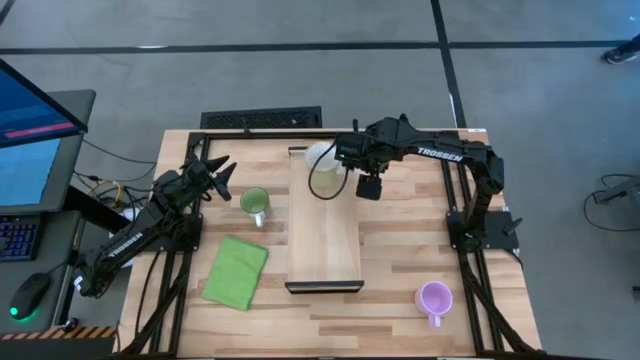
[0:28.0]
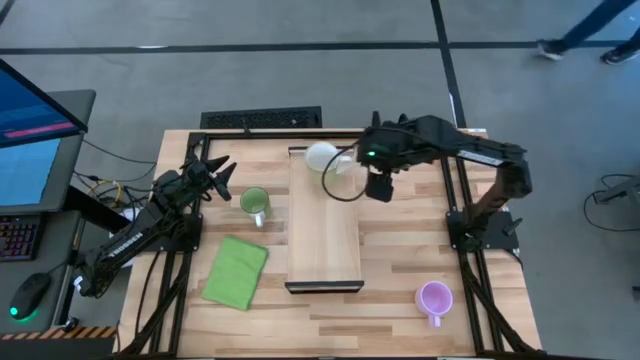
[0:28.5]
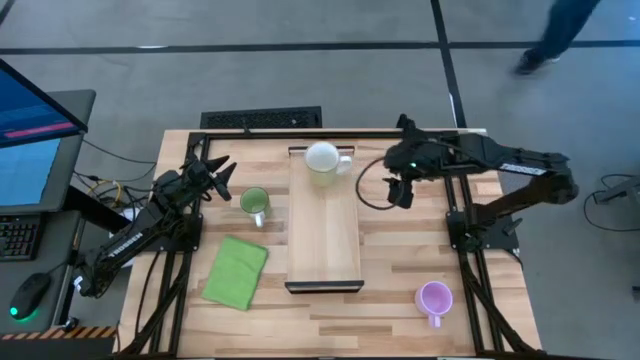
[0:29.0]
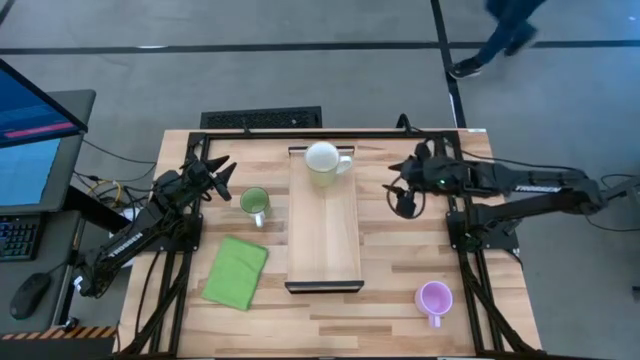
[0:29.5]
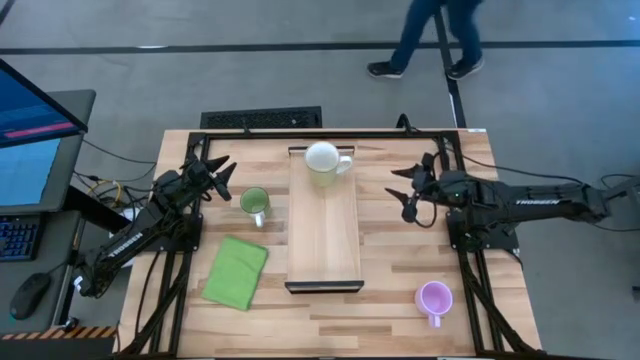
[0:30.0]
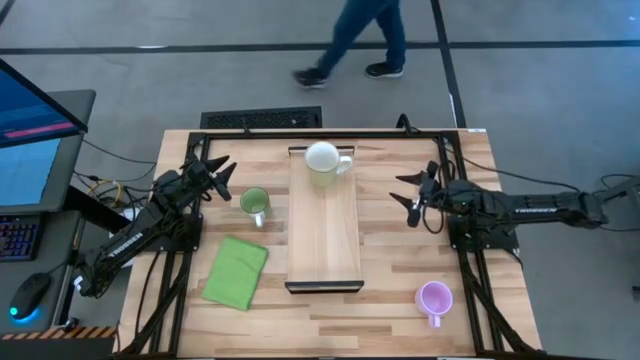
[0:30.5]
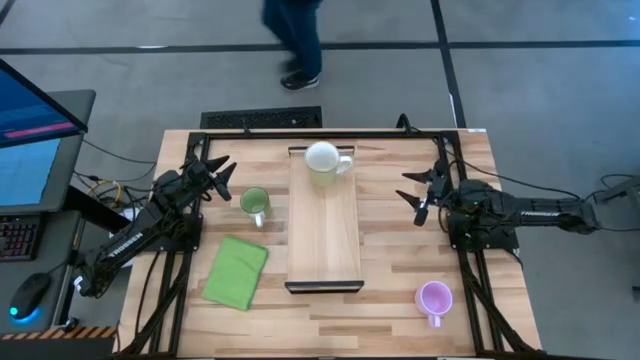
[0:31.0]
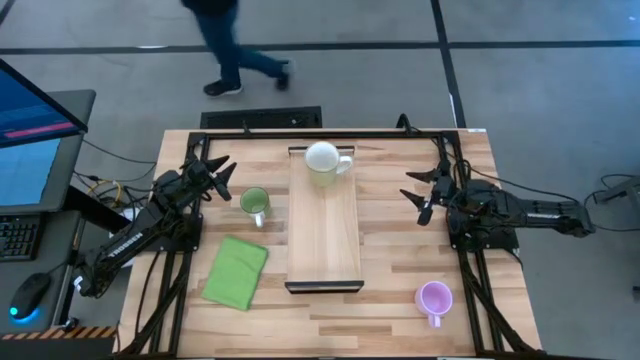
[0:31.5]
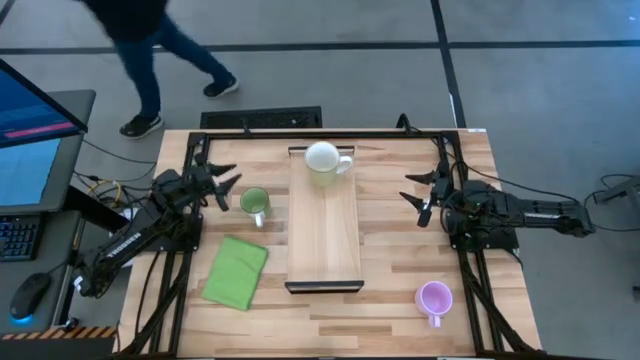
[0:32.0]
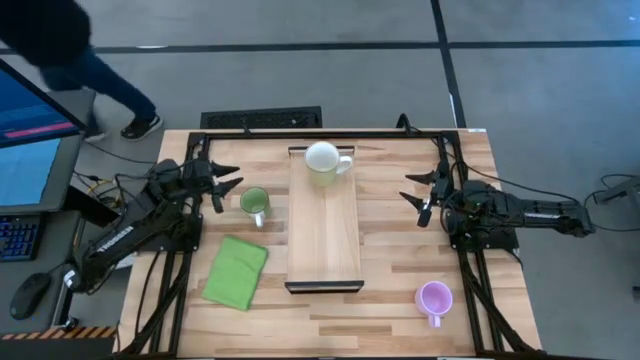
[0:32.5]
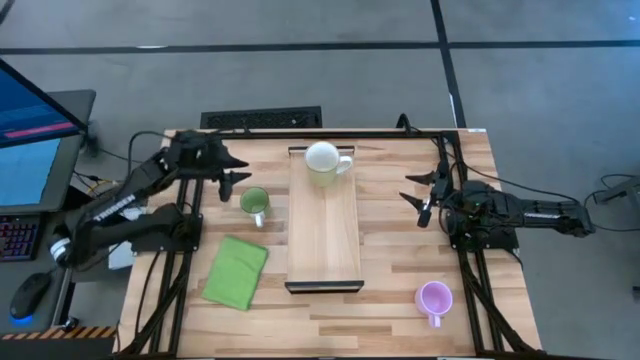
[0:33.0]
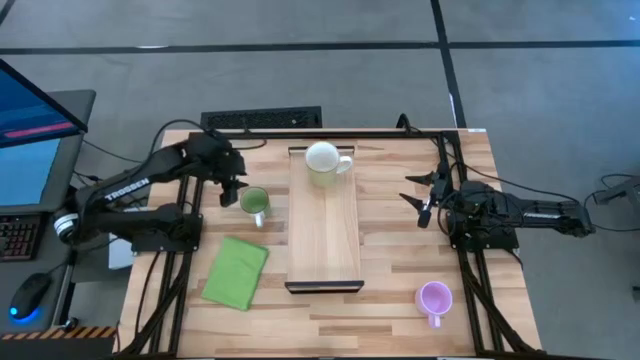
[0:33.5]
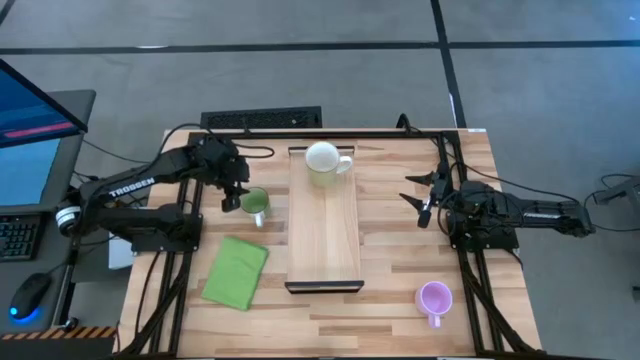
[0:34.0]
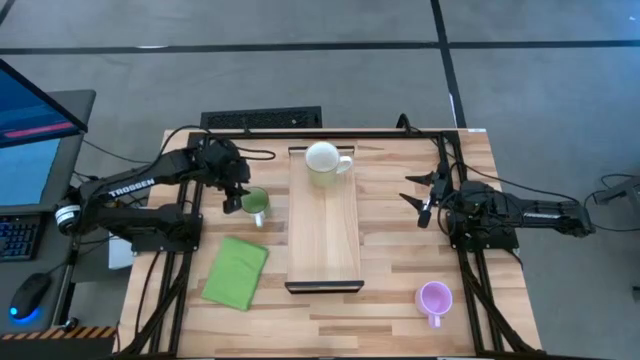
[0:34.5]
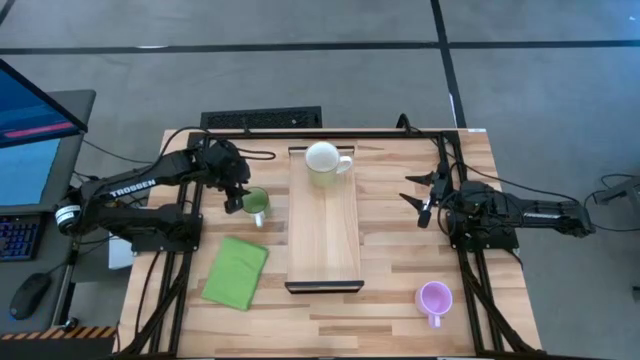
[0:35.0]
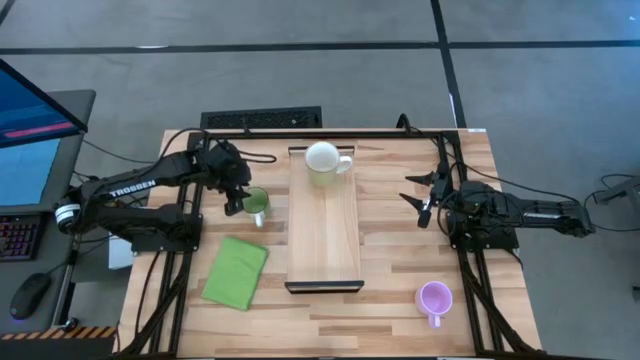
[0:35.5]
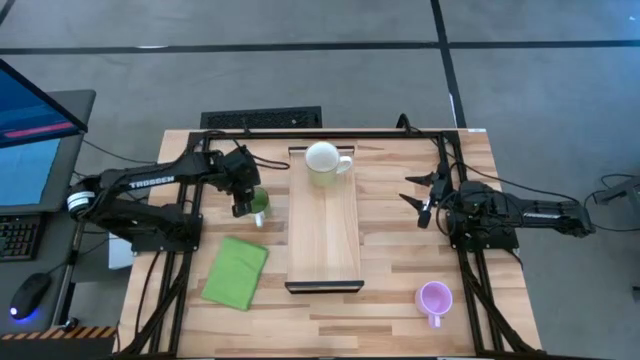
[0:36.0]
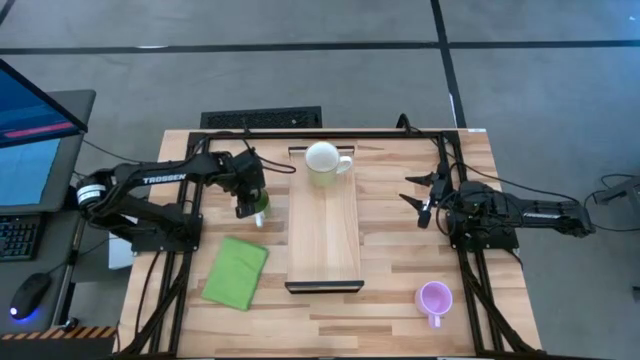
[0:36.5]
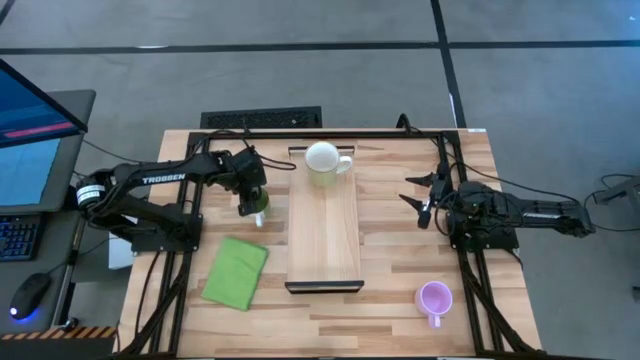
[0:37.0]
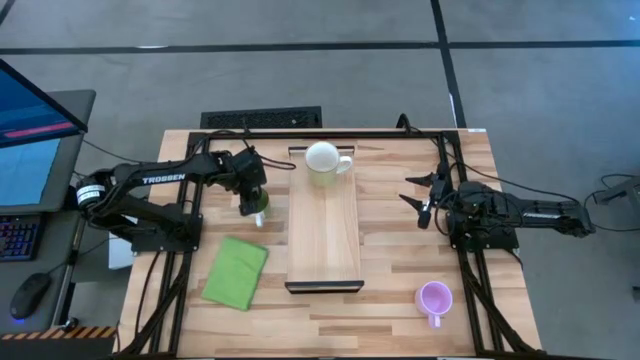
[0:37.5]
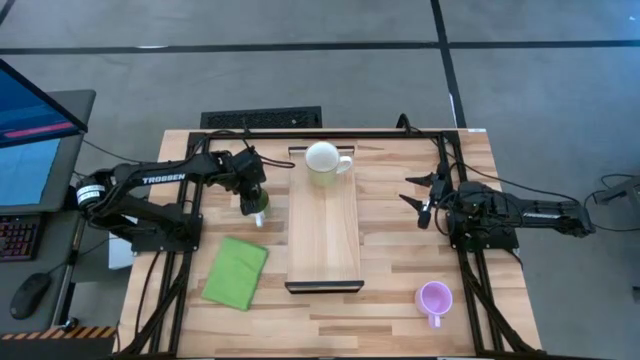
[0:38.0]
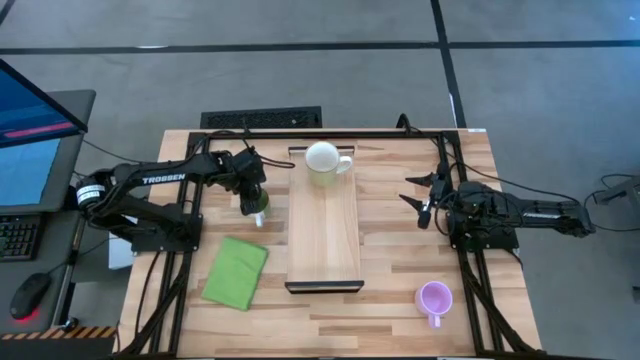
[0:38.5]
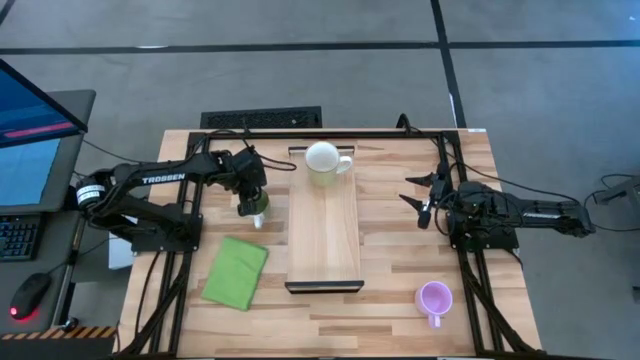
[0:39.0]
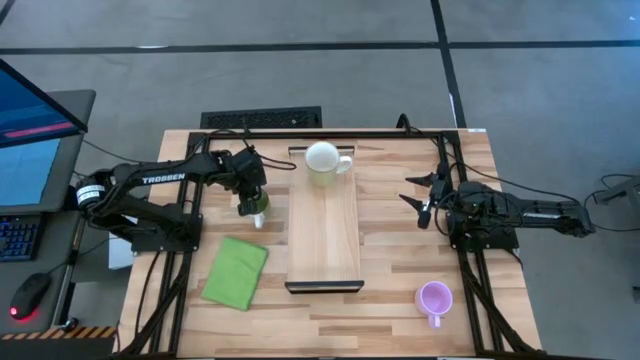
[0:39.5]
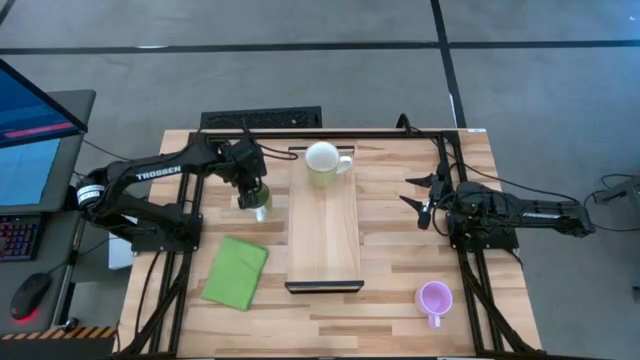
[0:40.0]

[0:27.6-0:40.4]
Task: Stack small to large cups/mugs on shelf
Put the green mug on the shelf
